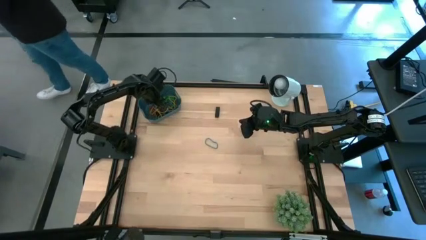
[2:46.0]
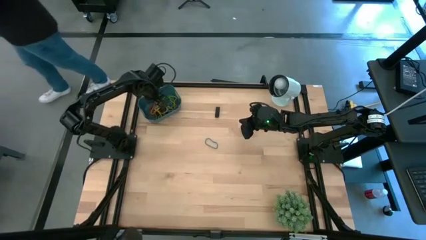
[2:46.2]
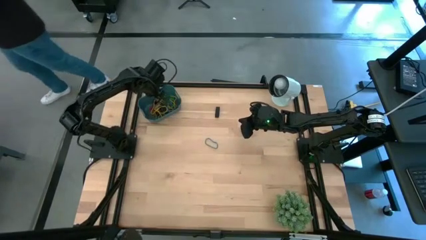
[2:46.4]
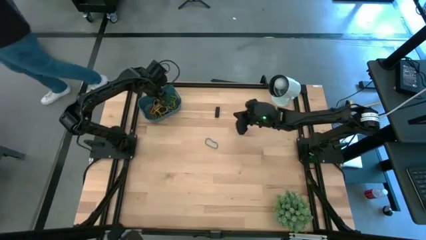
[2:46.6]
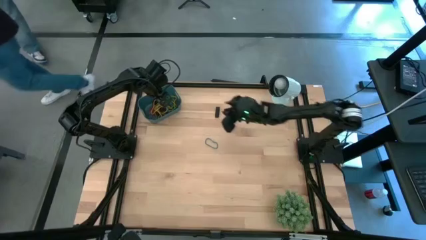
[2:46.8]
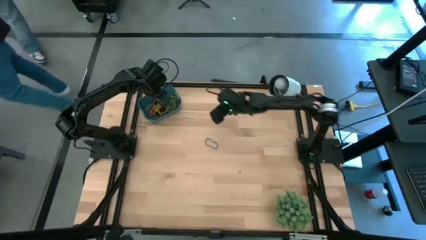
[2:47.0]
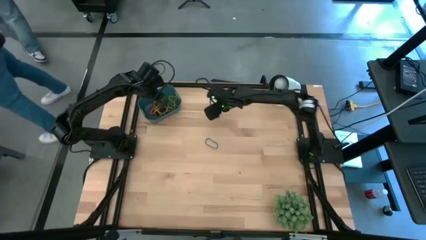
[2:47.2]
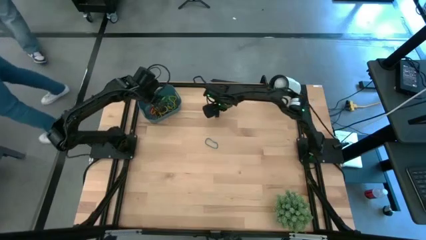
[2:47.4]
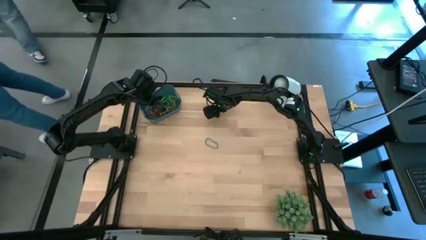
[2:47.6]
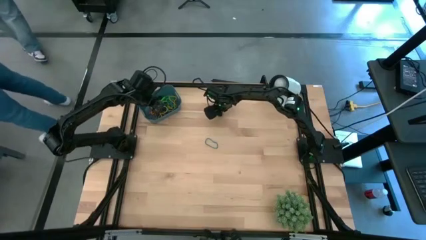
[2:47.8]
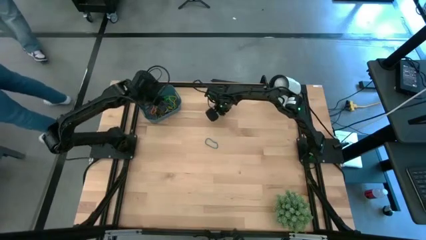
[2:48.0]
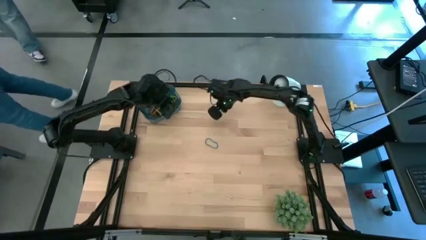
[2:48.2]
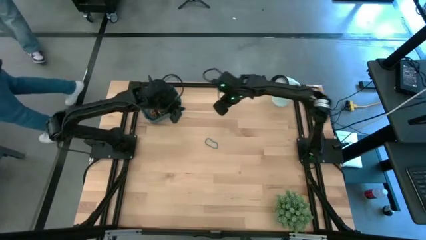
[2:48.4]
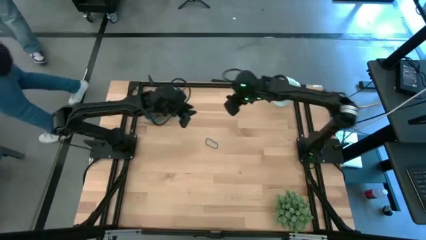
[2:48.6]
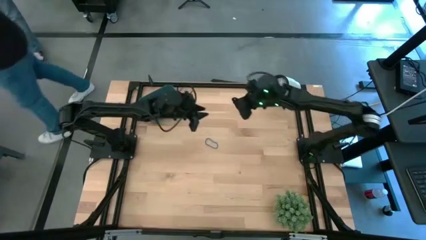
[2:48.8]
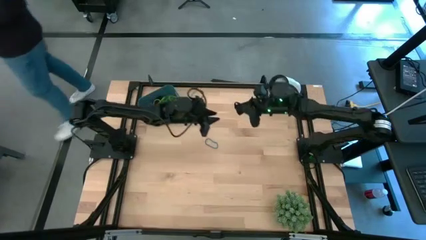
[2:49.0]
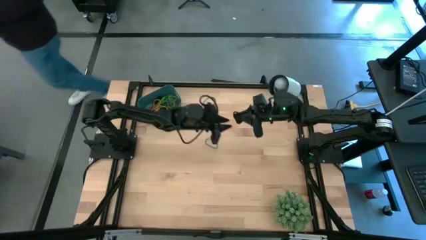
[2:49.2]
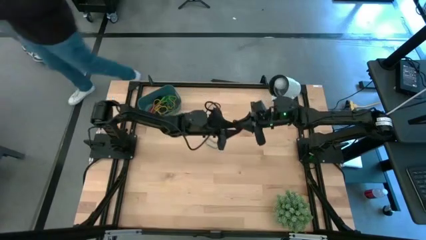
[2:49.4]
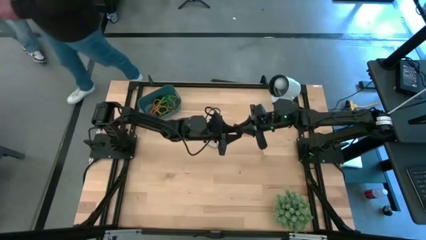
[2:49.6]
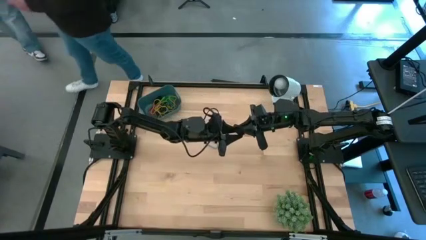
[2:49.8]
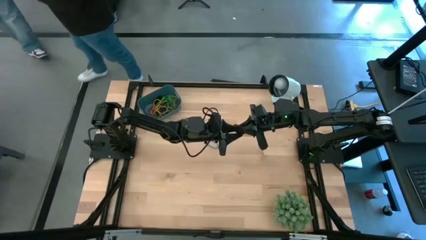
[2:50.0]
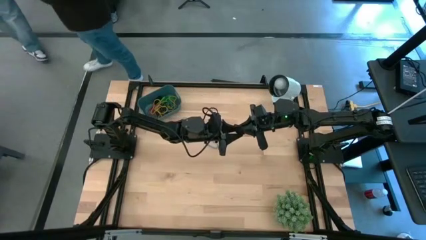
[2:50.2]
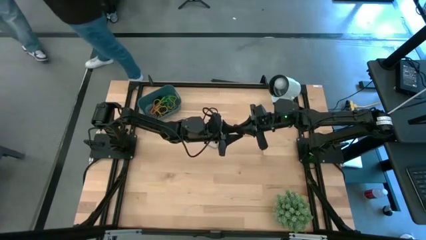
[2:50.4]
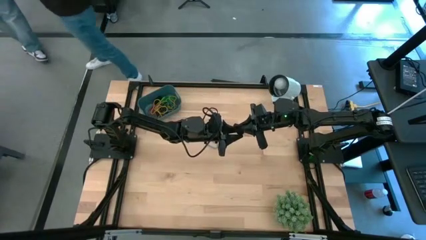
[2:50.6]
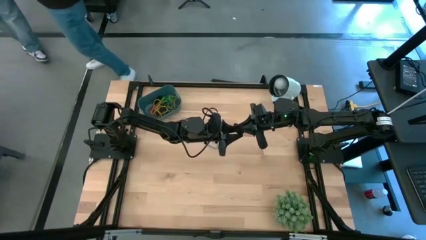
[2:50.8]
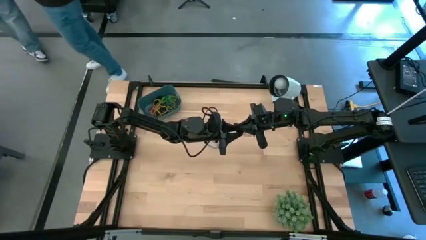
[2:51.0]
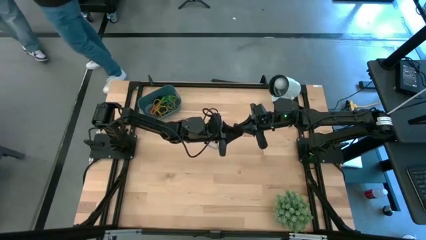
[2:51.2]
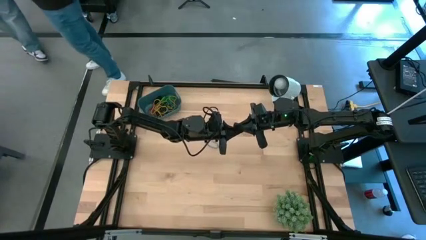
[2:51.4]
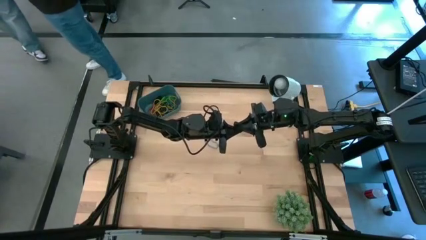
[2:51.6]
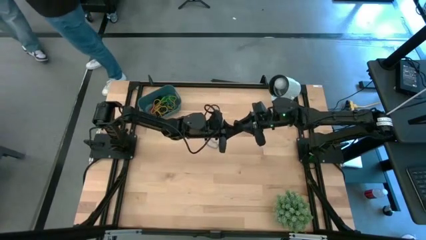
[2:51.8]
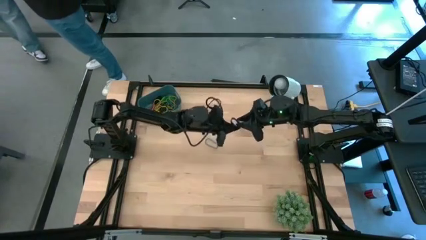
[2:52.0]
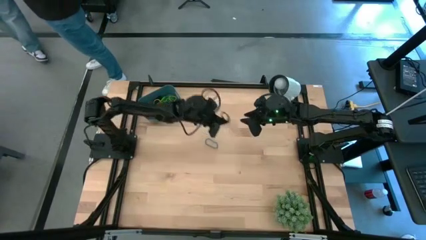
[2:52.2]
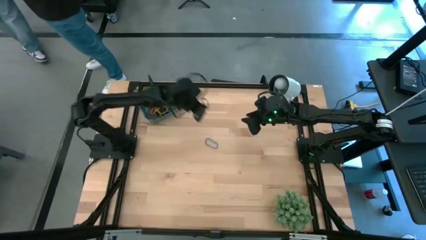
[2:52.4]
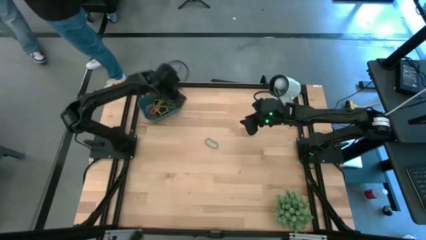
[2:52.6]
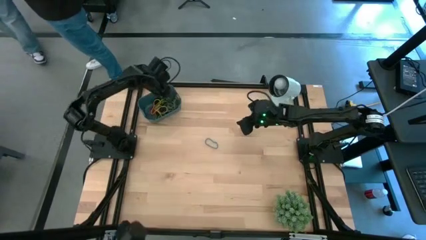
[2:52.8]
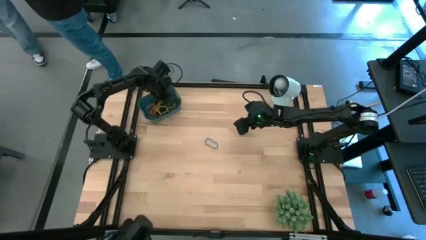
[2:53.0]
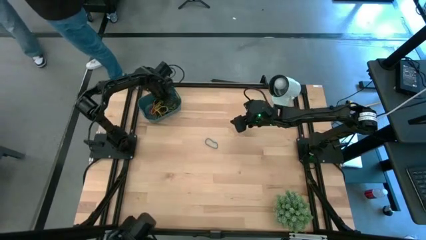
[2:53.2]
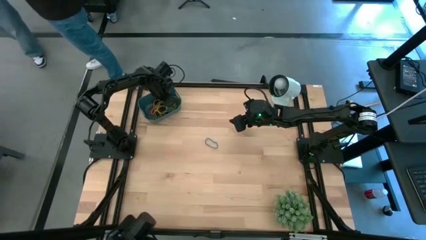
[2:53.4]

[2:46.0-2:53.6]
Task: Pick and place rubber bands into bin
Put the black rubber band into the bin

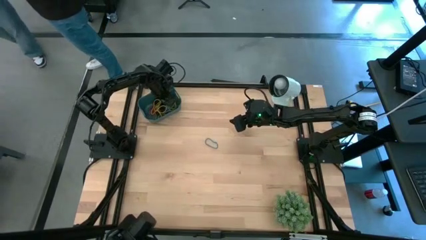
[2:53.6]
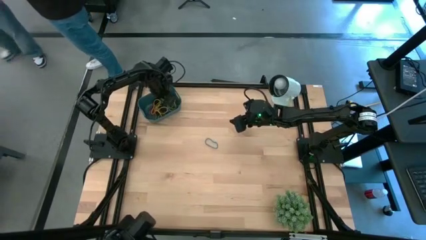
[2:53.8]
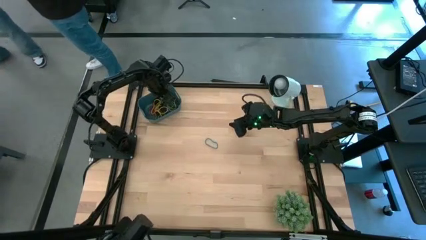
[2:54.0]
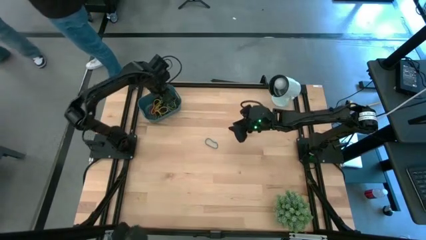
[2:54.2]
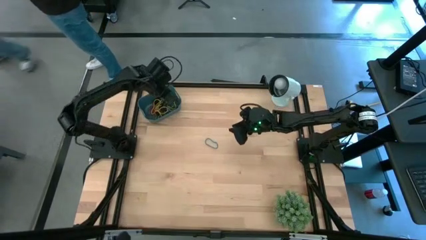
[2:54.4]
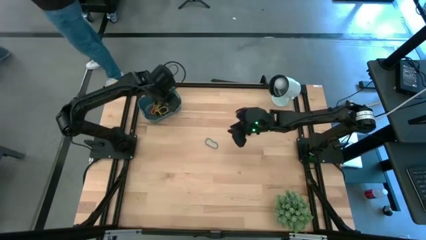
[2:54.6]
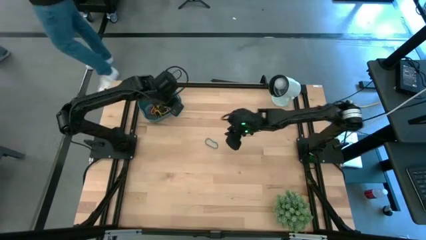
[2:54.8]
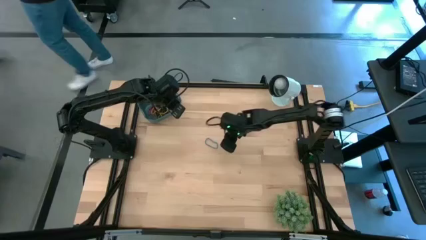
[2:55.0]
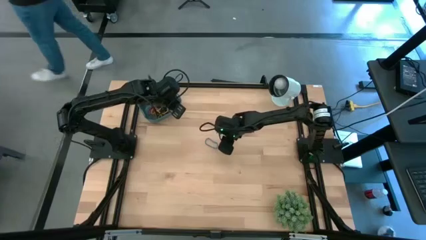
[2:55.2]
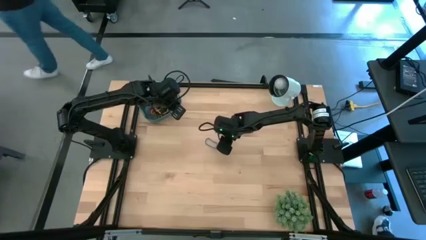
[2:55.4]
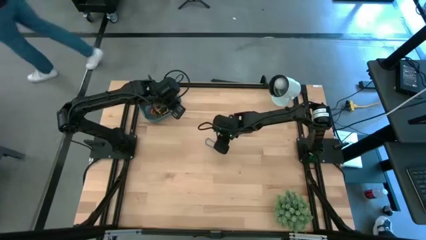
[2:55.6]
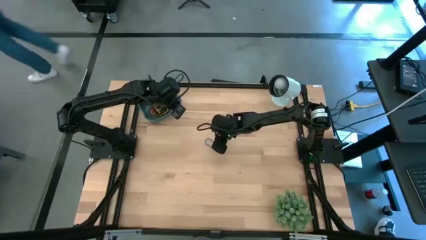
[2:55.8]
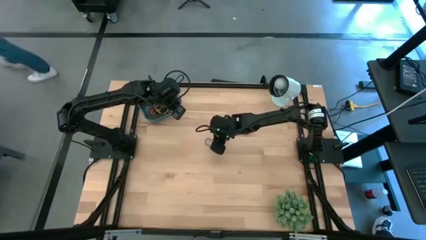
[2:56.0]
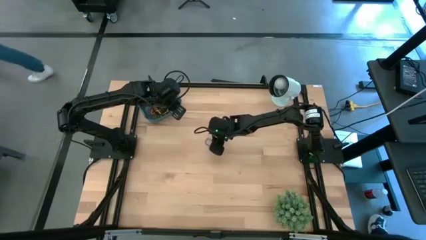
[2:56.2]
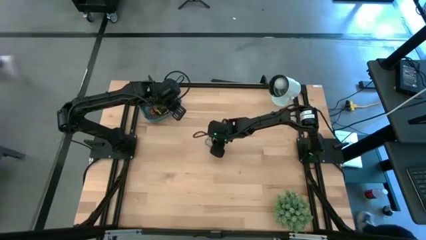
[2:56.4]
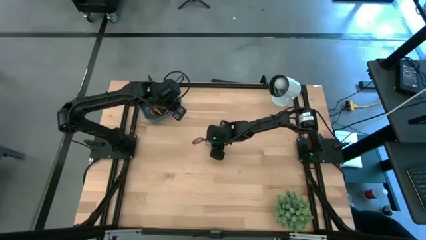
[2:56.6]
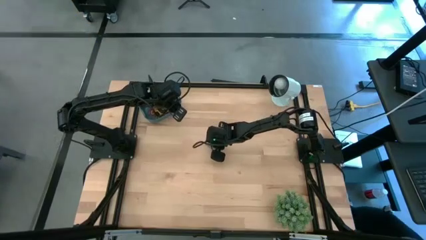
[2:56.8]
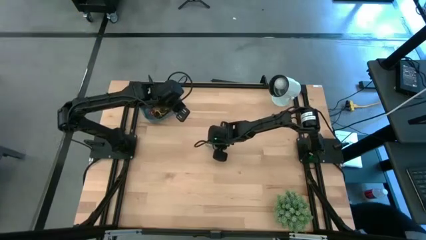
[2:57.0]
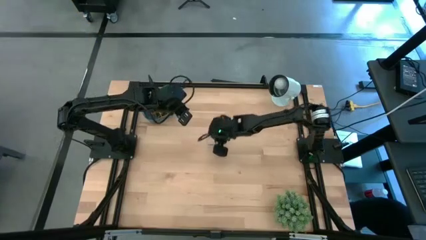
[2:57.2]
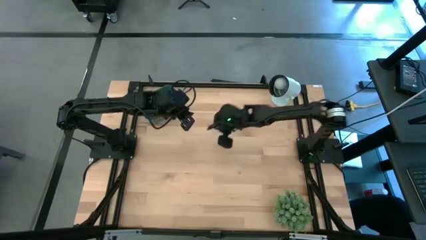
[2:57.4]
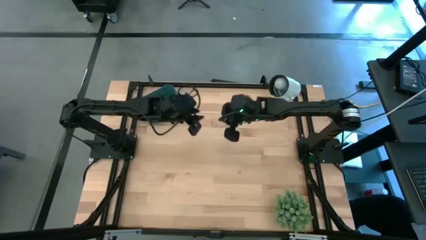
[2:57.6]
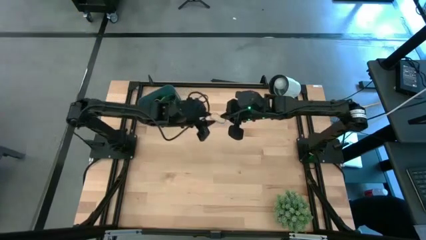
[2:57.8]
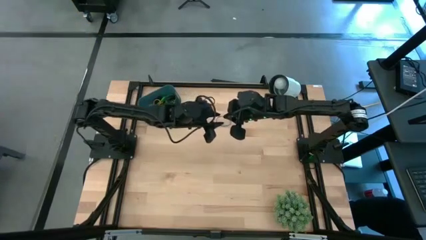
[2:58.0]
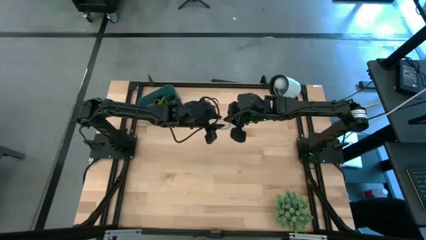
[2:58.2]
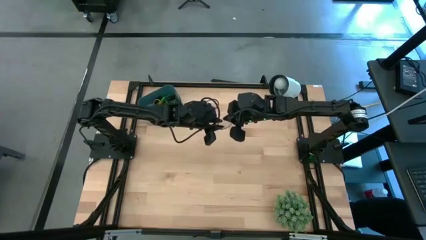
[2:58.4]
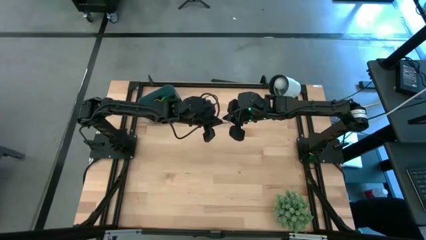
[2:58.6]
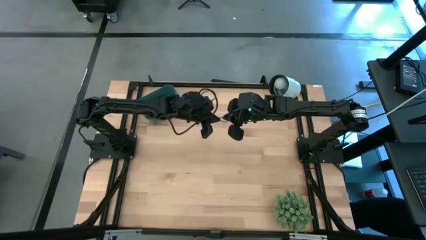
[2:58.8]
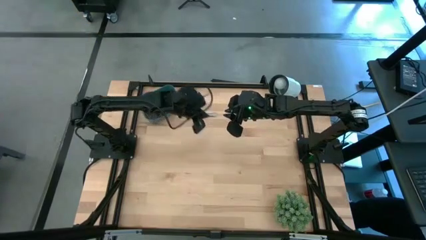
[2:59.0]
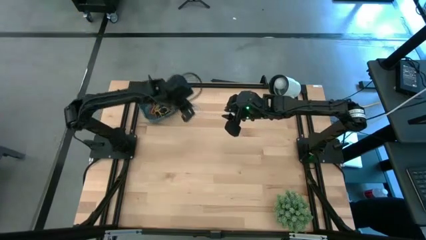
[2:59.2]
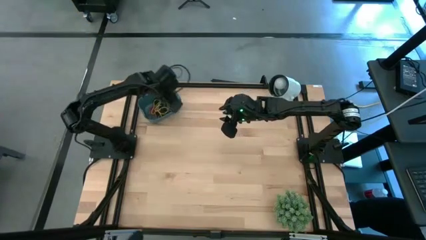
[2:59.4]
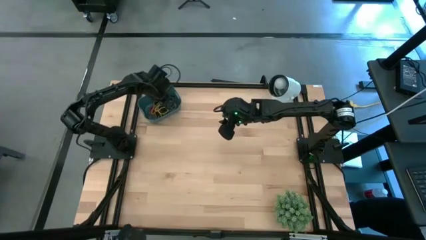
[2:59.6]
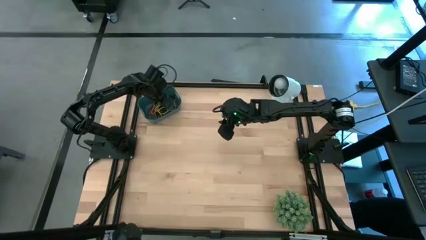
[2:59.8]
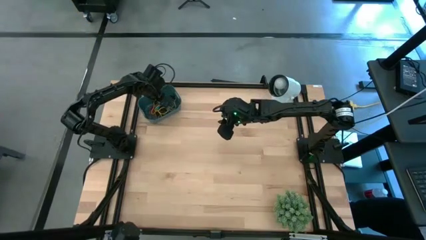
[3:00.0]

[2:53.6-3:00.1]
Put the blue rubber band into the bin

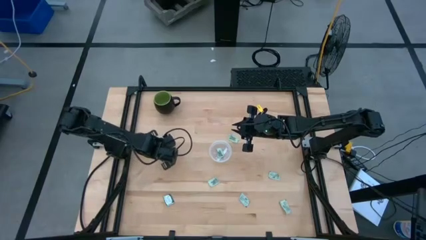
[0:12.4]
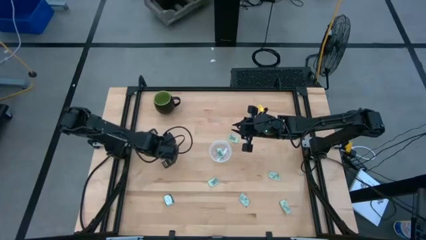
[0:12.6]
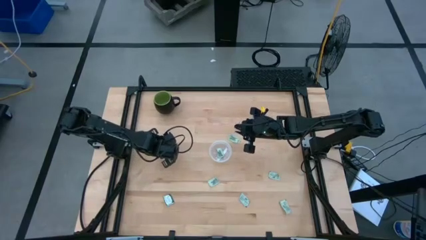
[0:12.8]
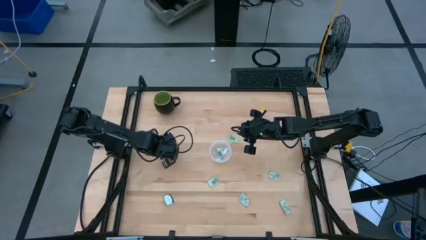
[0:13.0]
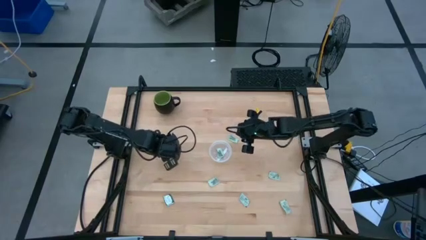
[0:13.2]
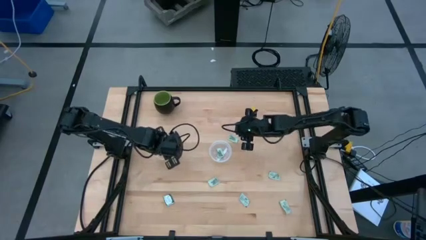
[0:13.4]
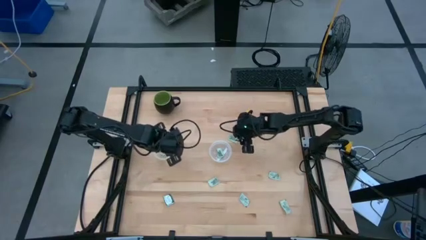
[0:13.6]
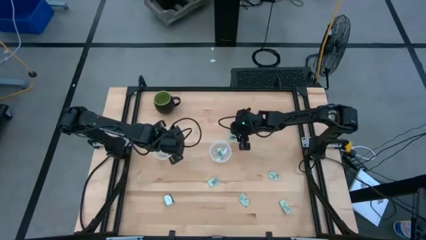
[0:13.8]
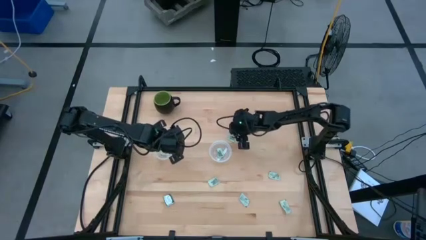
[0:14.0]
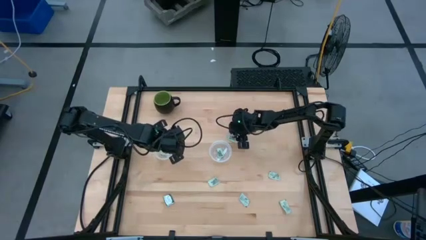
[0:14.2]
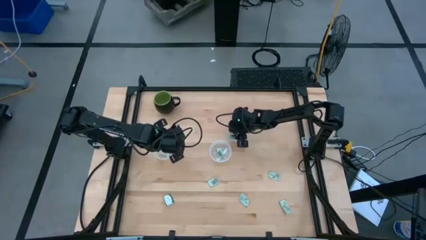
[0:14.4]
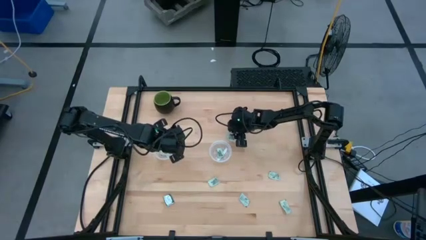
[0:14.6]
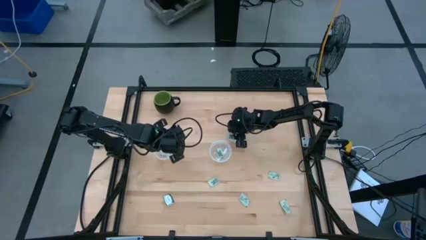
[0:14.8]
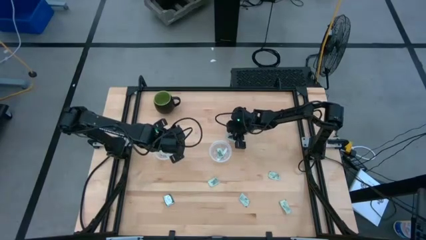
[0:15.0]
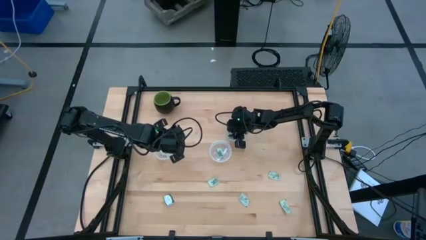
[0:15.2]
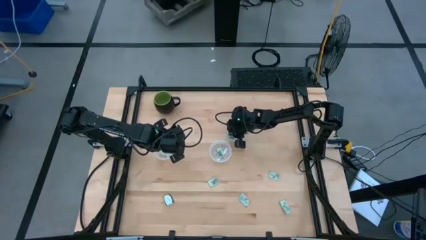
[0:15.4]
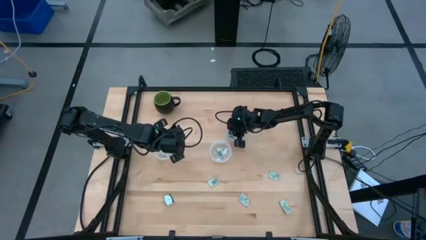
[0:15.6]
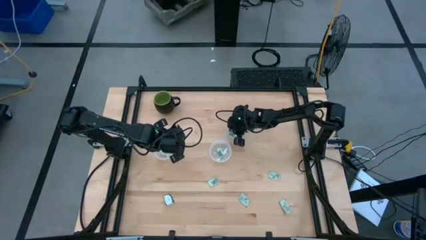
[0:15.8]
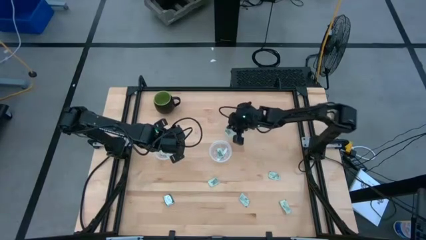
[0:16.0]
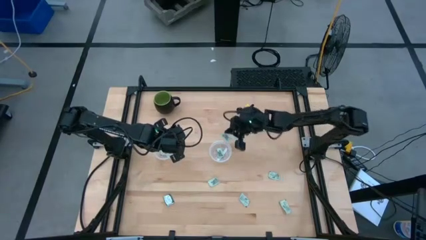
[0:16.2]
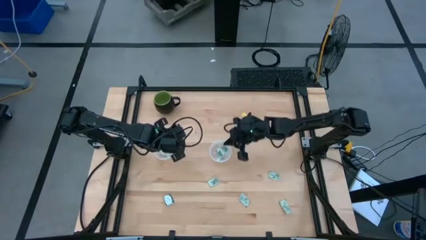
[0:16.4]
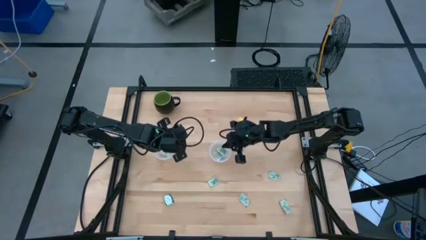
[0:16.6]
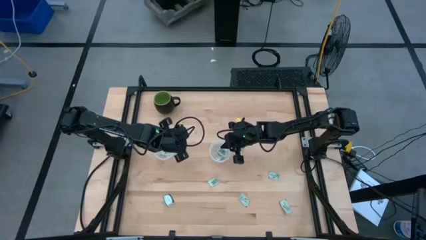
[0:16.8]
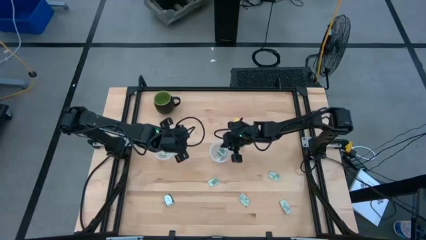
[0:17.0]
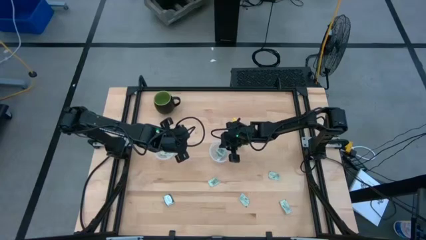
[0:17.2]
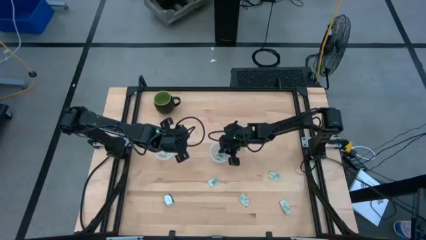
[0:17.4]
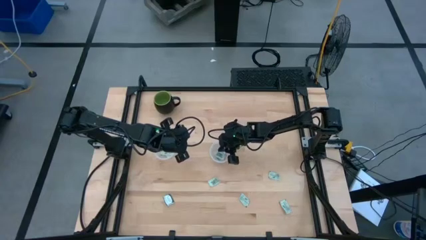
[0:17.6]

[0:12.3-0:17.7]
Task: Pick and place Stevia / Truvia into bins
Put the white stevia packet into the right transparent container
